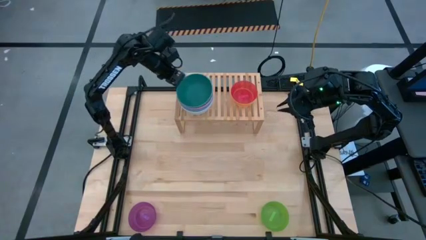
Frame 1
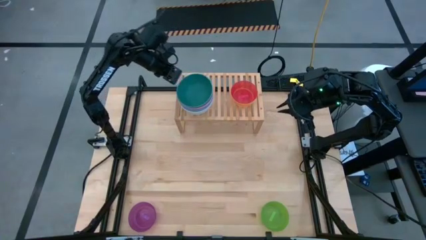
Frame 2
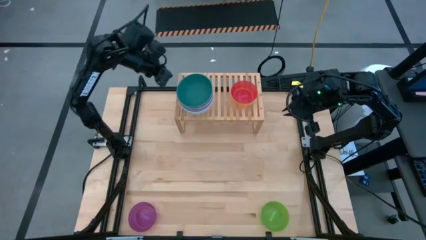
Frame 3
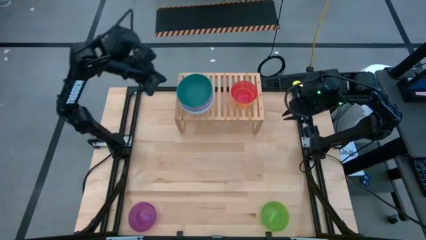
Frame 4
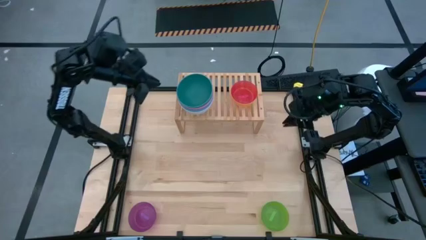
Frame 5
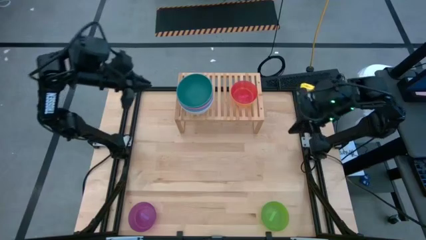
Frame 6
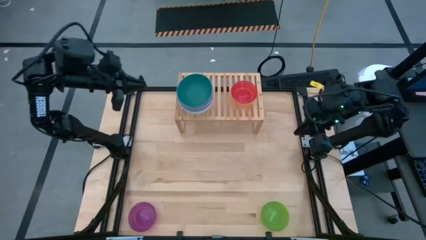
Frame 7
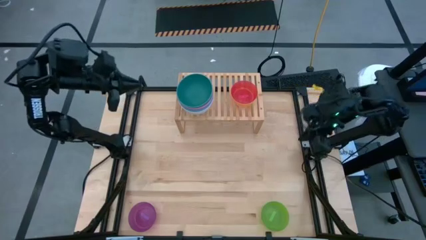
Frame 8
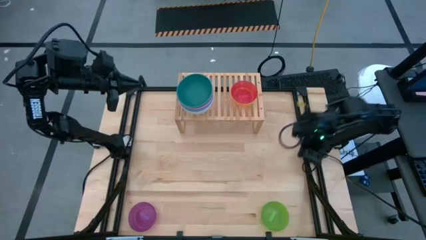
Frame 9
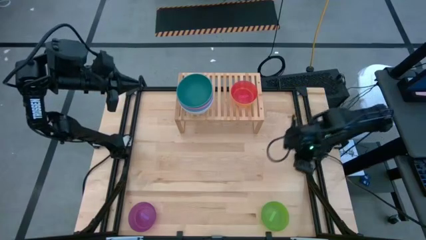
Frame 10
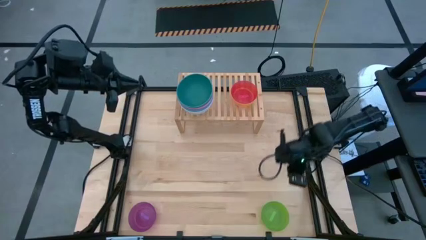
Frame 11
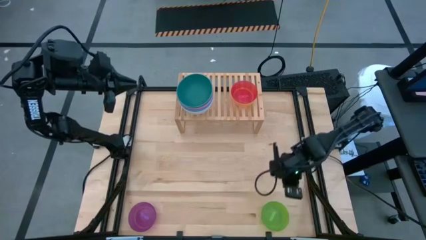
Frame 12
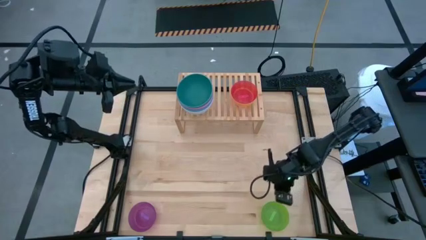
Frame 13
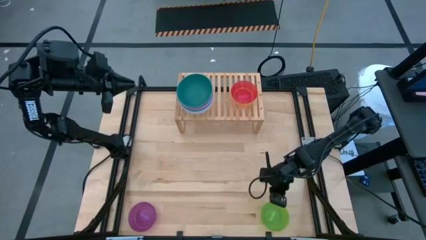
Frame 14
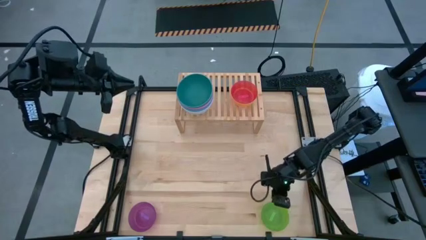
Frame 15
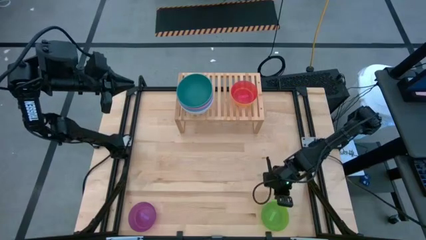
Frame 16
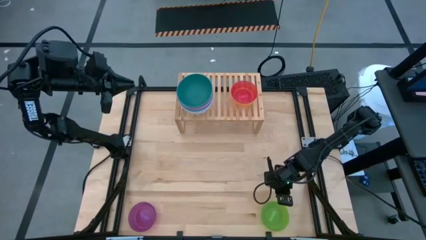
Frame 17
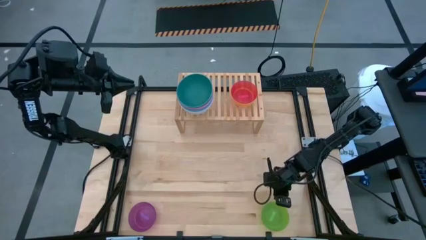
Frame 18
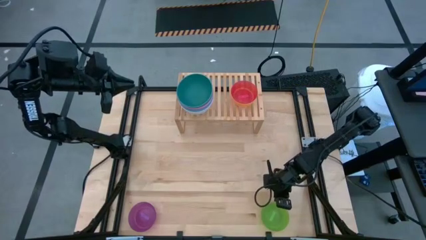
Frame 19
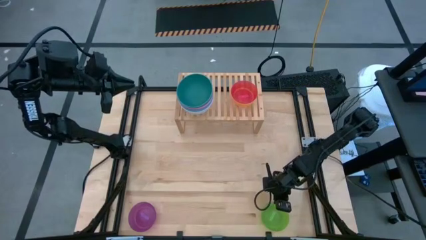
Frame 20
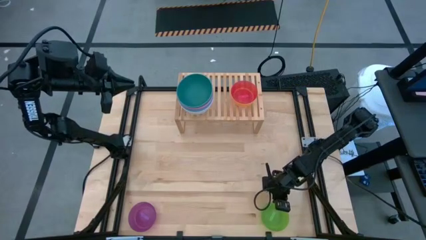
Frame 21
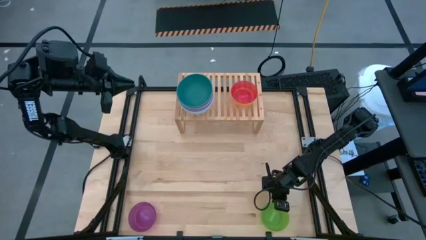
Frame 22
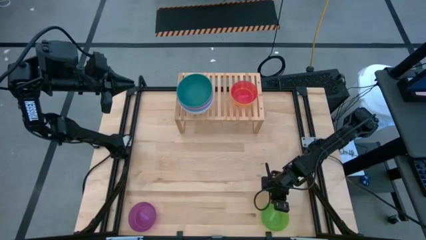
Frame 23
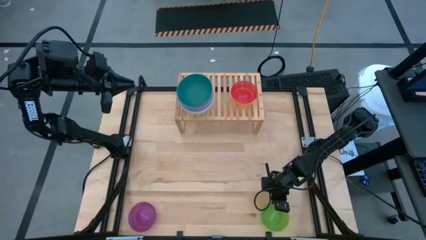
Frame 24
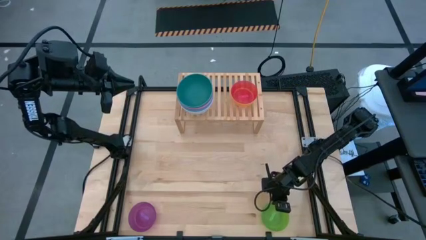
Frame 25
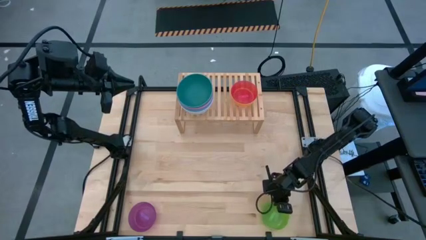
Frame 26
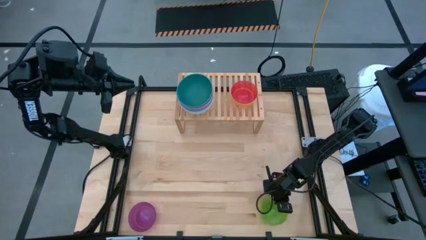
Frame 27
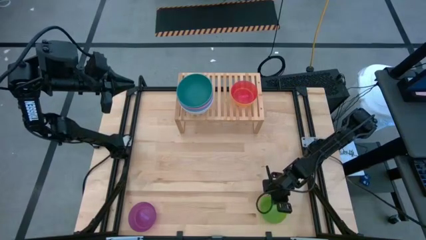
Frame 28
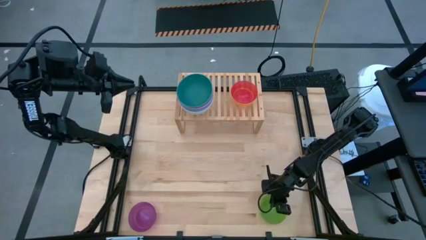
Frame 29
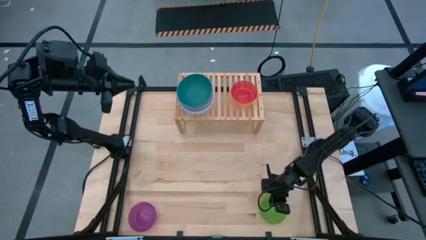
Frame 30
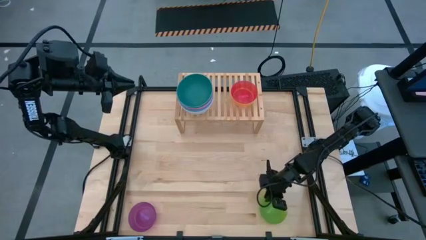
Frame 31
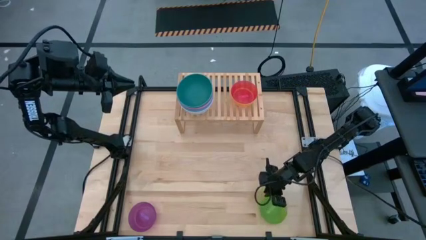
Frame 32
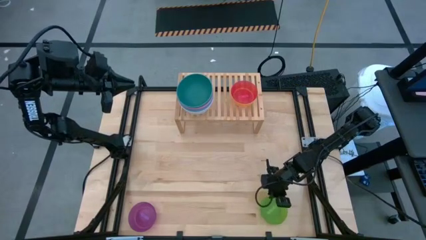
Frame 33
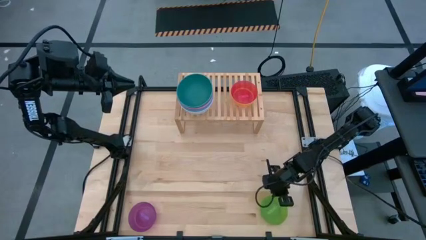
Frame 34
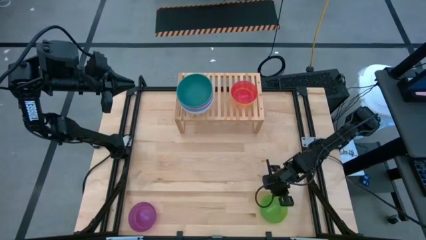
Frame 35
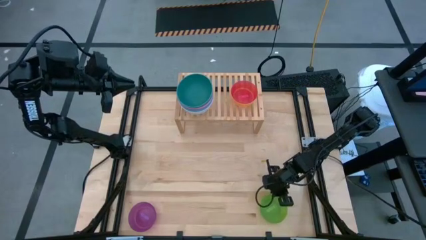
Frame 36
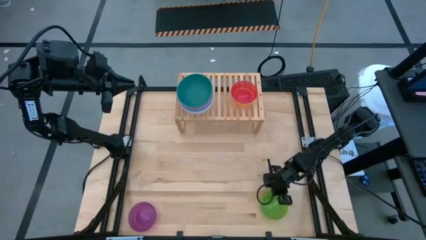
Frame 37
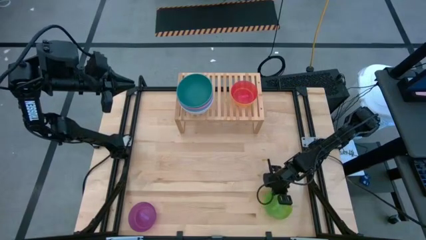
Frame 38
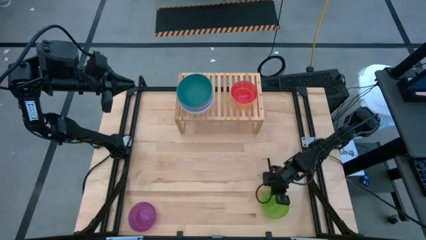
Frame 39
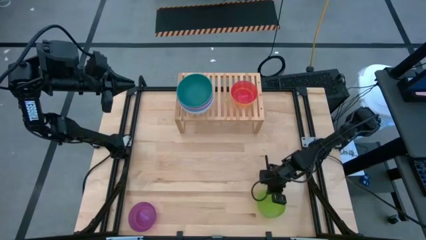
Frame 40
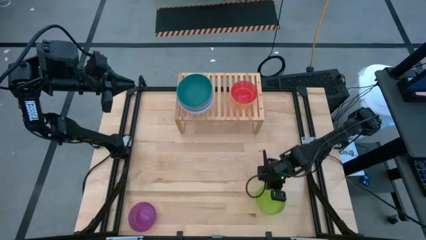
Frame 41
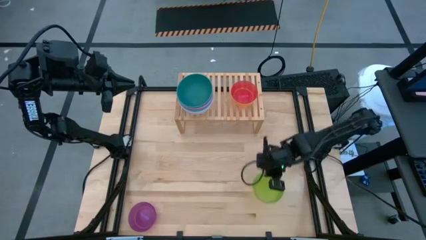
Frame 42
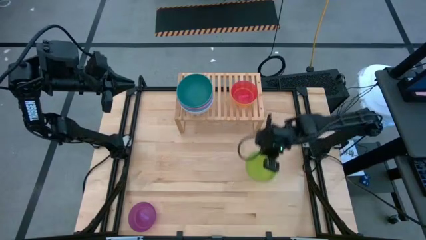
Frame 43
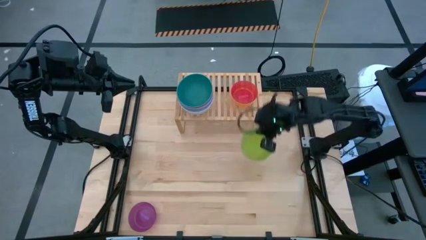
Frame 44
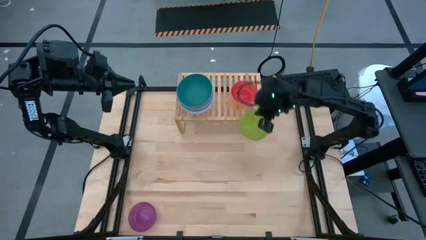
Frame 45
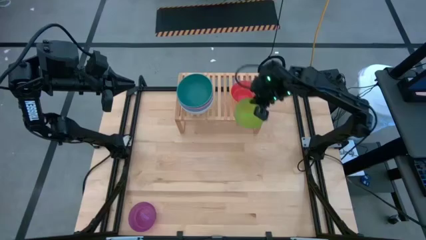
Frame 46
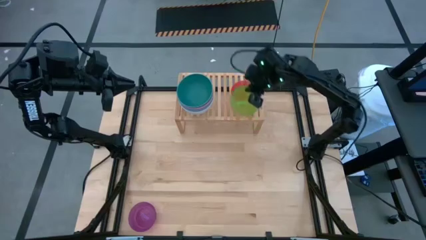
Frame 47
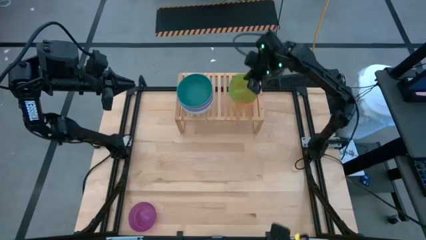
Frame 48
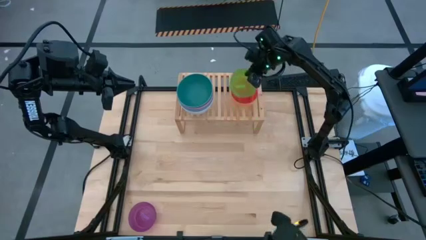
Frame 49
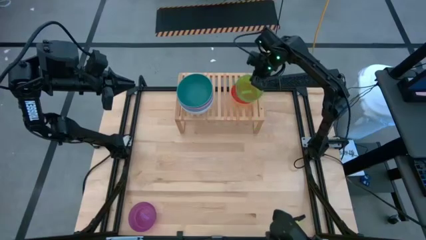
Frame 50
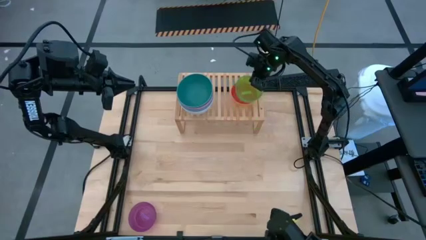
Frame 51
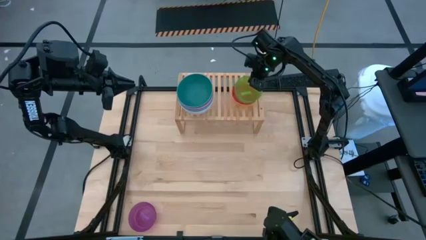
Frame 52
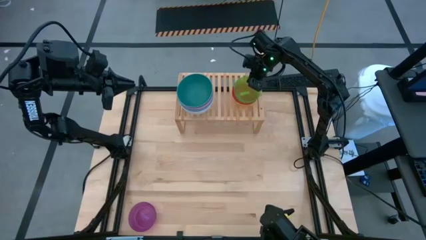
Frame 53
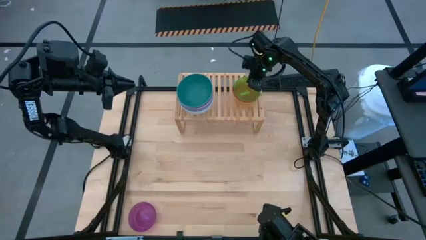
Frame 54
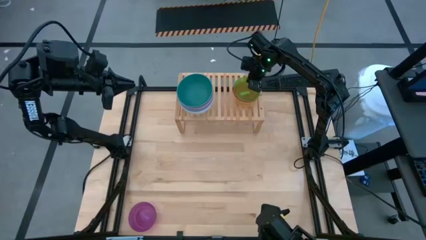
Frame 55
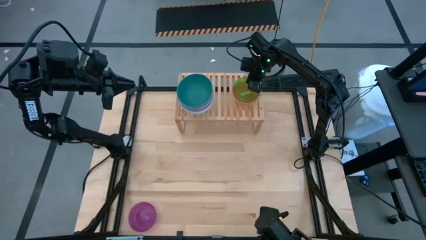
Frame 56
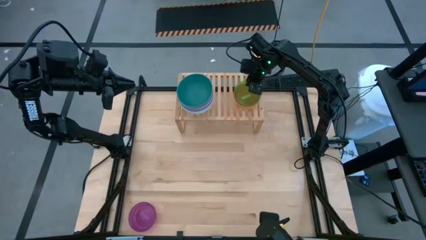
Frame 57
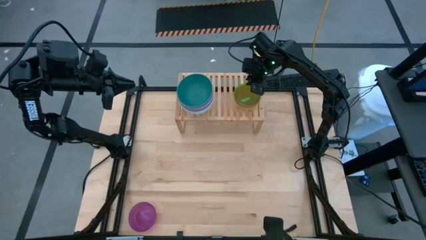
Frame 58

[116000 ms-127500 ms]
Task: Place and stack bowls onto a shelf
Stack the light green bowl on top of the red bowl on the shelf

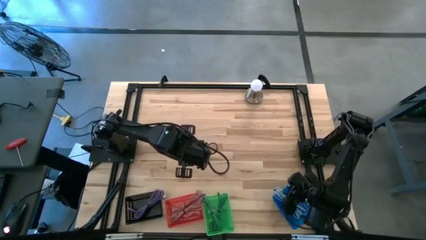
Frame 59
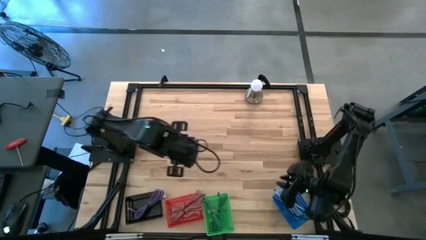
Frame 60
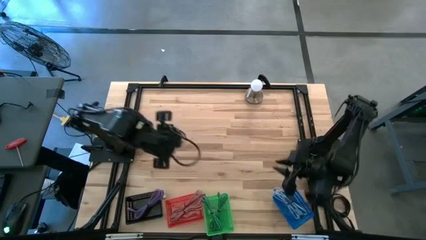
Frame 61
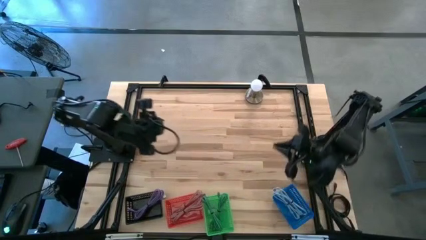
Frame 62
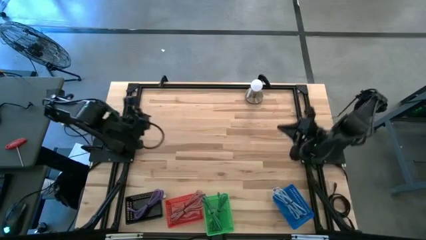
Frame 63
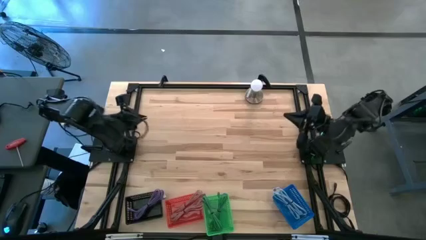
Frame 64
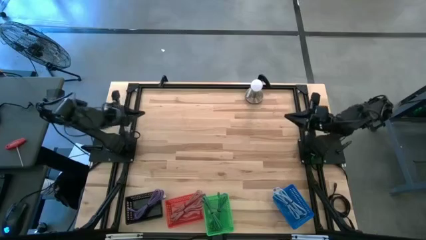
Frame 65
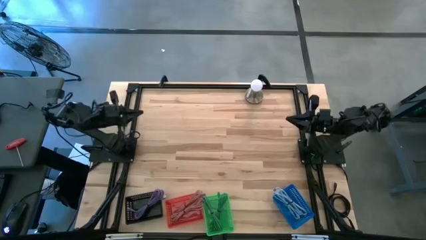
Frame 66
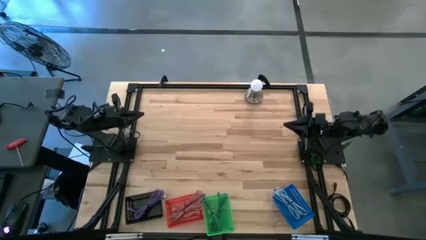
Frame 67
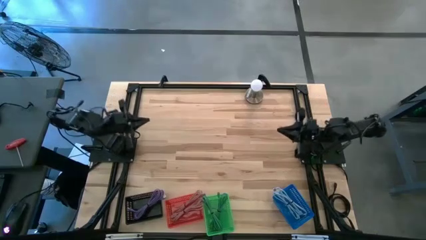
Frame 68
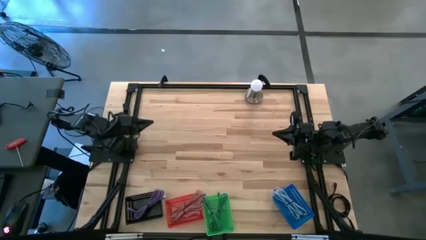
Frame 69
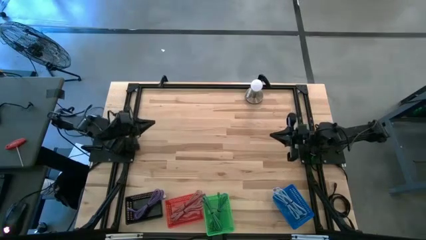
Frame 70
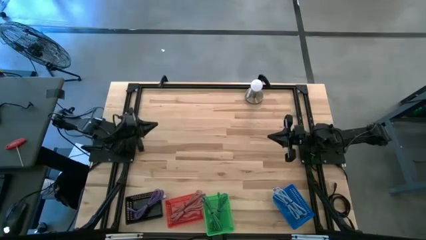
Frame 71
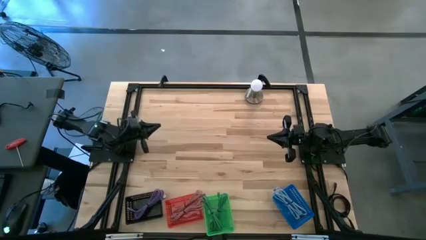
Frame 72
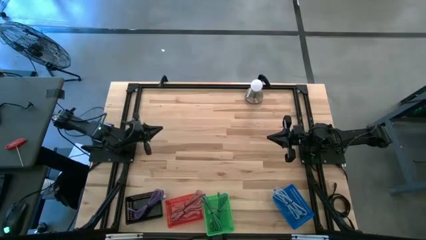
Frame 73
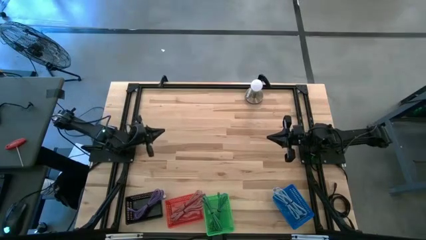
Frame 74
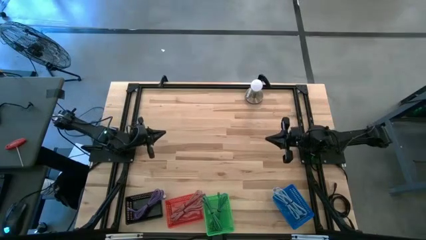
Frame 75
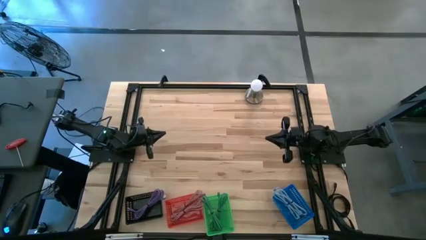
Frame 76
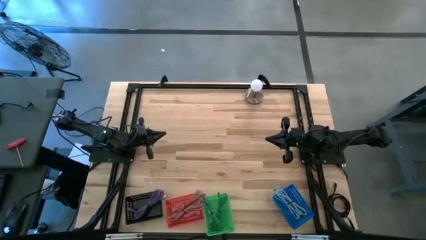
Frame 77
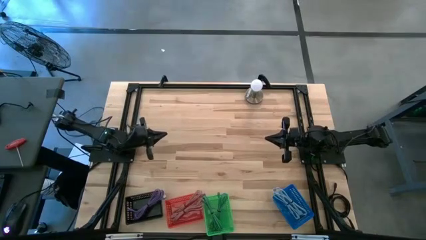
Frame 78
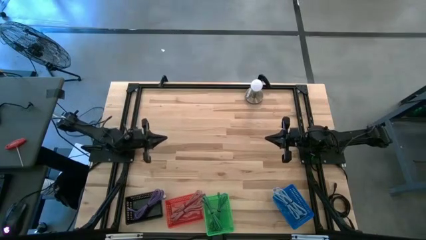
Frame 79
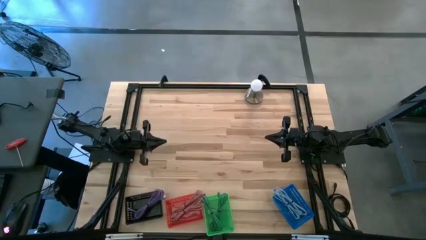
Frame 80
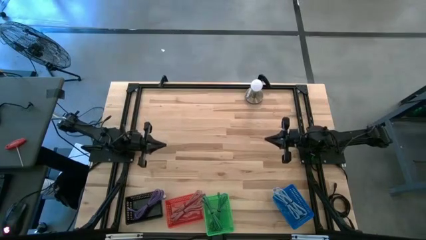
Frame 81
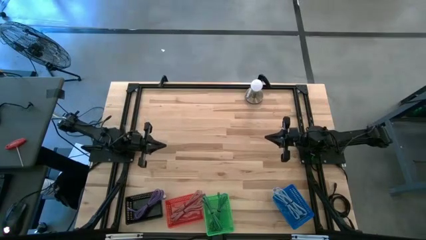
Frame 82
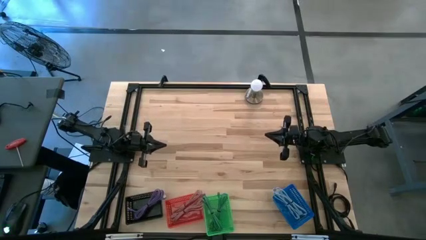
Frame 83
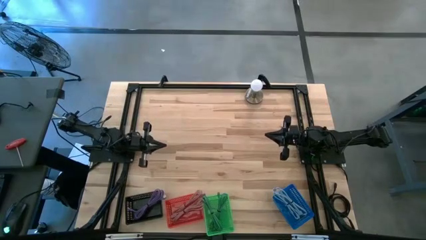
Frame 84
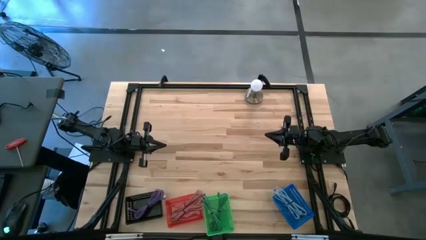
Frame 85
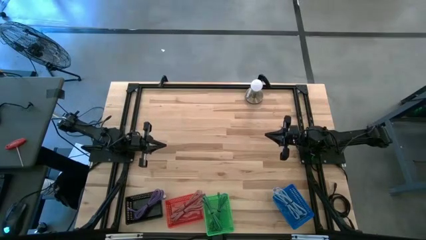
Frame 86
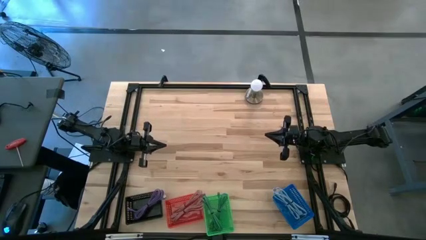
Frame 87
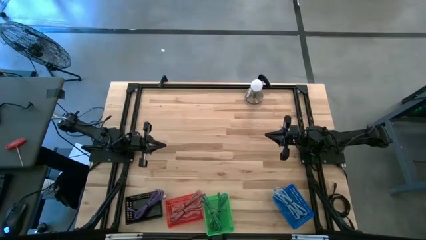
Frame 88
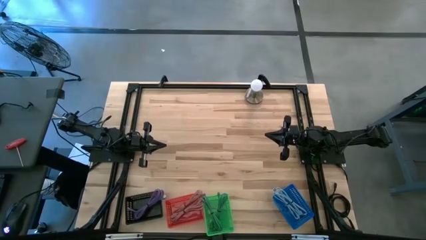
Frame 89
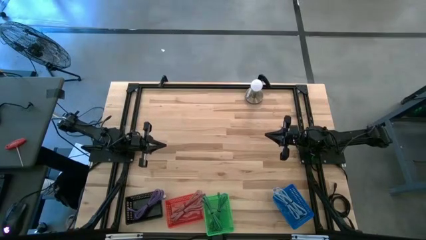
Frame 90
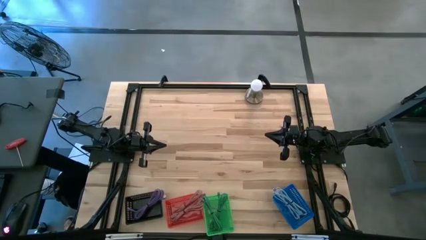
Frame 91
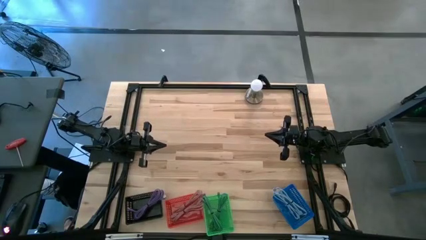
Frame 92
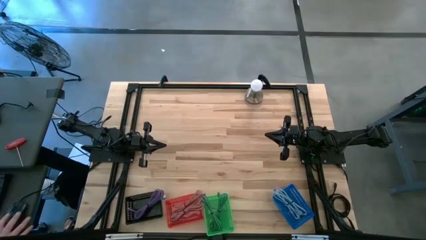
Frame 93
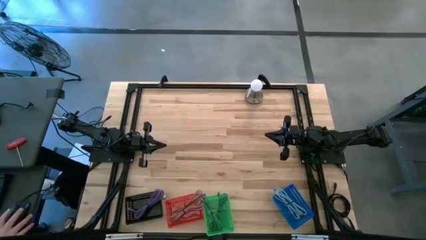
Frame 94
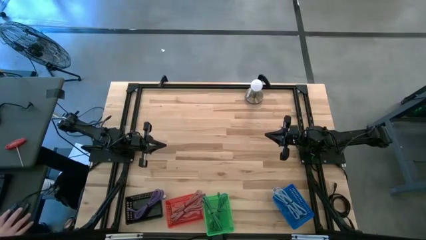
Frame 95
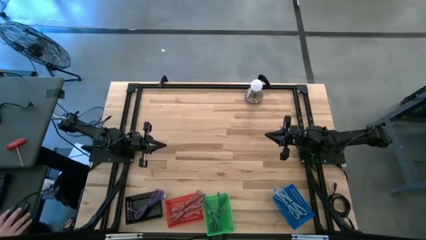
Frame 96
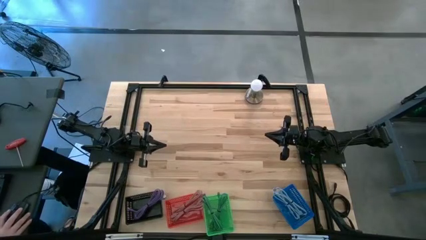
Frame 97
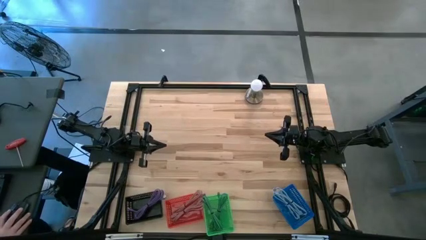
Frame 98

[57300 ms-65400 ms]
Task: Pick & Place USB Port
Return to Home Position
